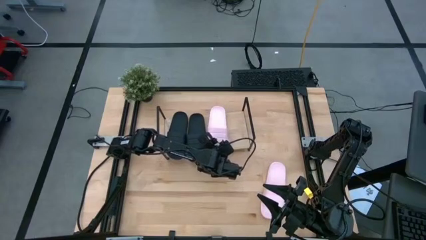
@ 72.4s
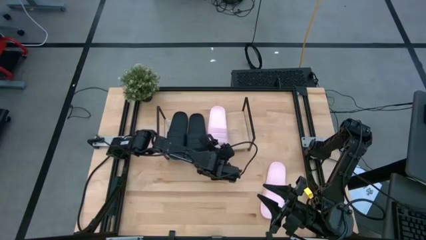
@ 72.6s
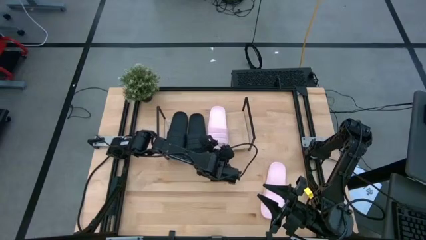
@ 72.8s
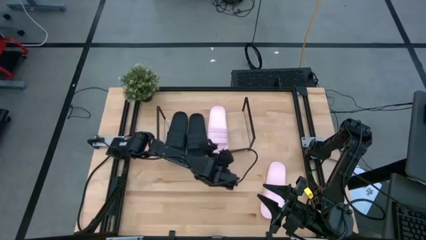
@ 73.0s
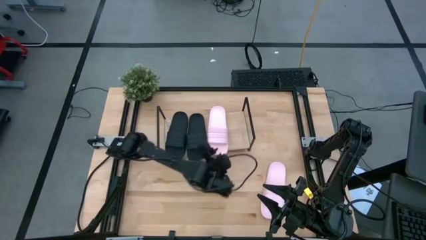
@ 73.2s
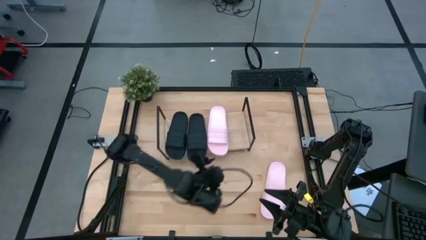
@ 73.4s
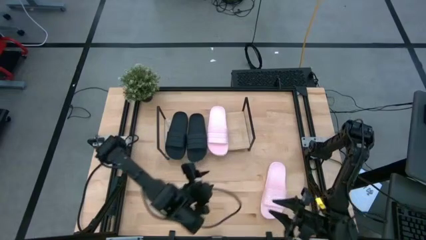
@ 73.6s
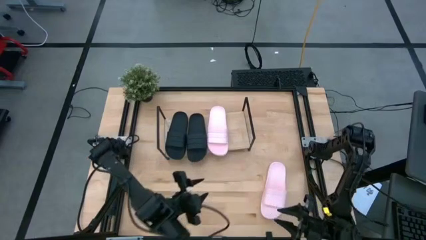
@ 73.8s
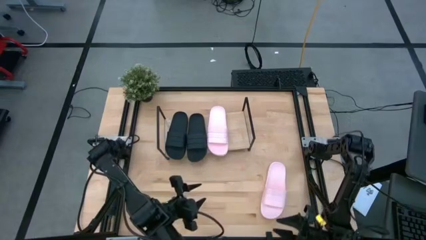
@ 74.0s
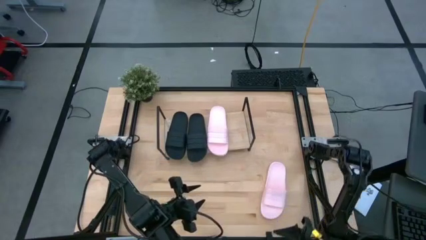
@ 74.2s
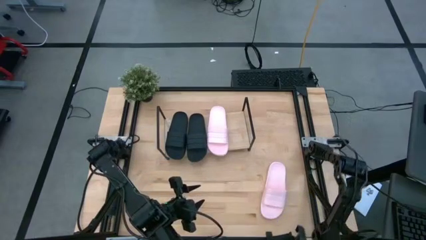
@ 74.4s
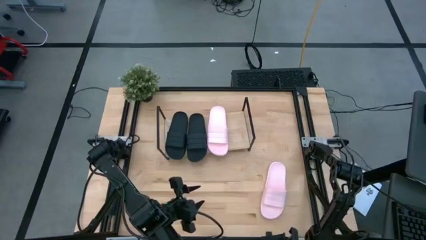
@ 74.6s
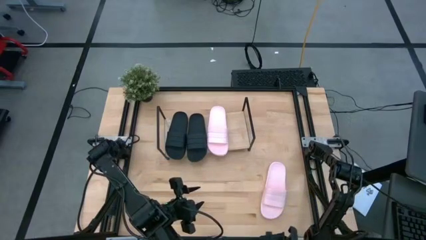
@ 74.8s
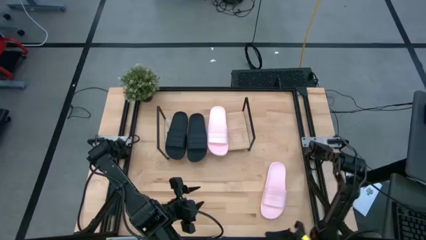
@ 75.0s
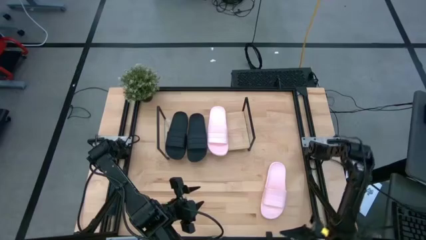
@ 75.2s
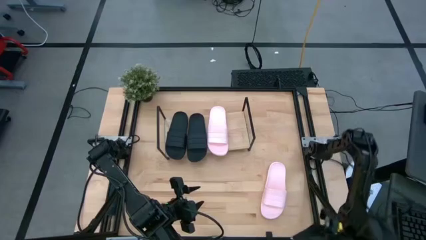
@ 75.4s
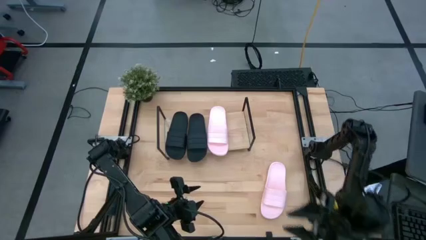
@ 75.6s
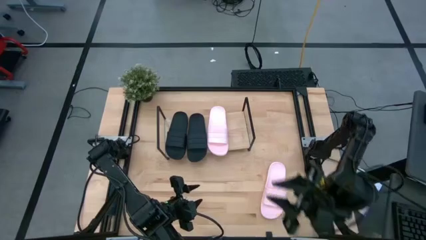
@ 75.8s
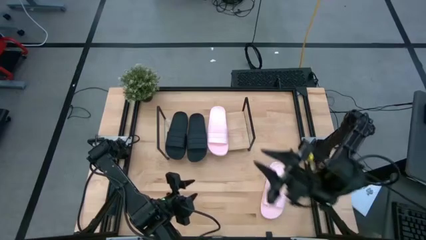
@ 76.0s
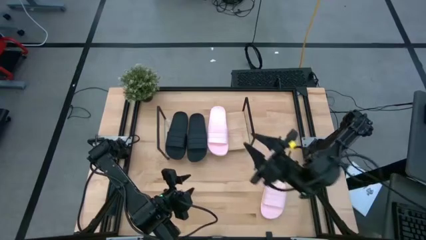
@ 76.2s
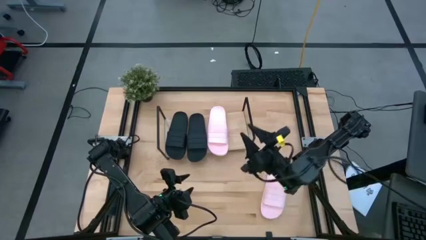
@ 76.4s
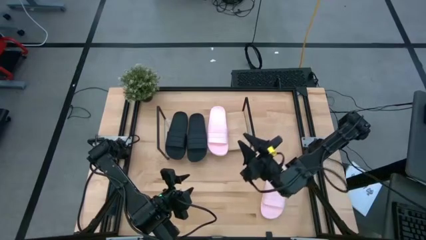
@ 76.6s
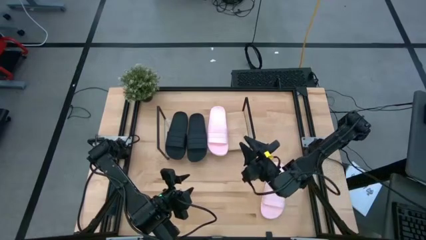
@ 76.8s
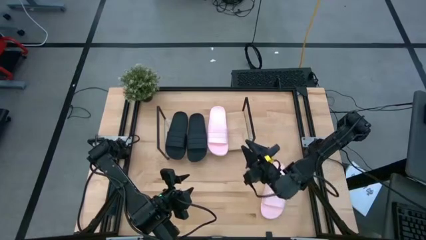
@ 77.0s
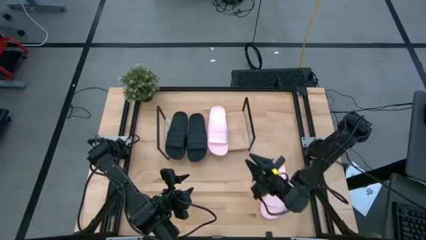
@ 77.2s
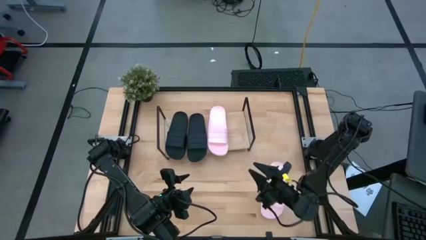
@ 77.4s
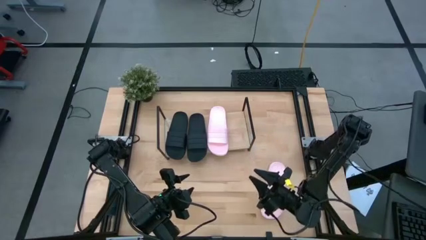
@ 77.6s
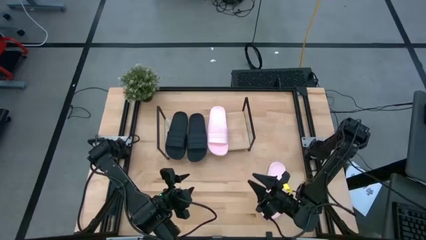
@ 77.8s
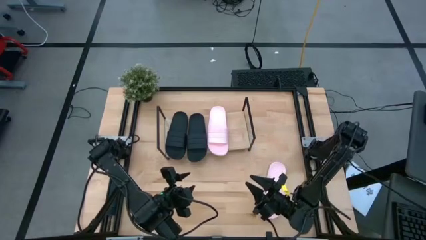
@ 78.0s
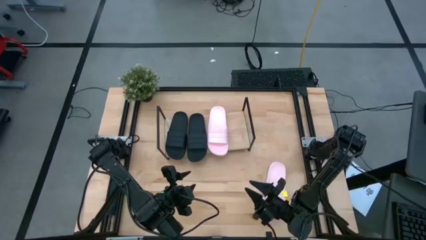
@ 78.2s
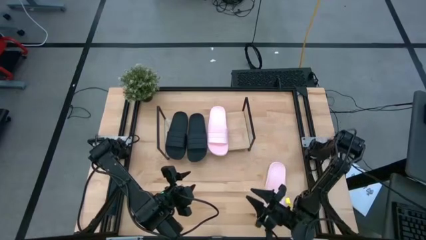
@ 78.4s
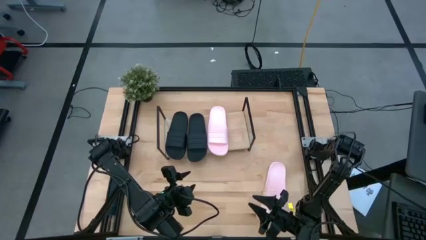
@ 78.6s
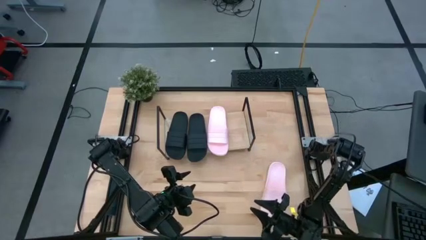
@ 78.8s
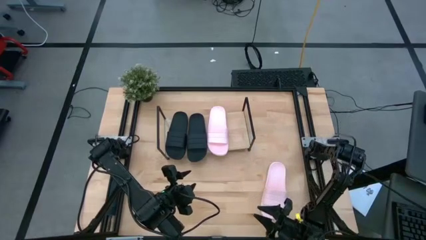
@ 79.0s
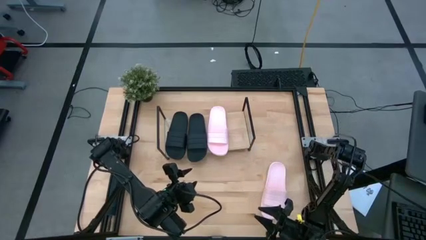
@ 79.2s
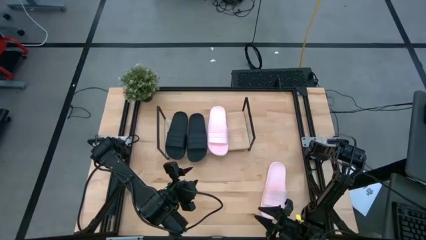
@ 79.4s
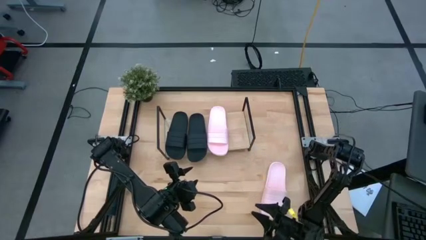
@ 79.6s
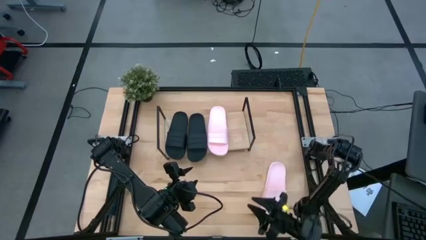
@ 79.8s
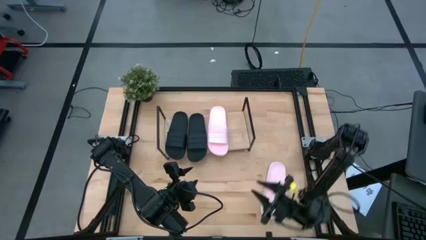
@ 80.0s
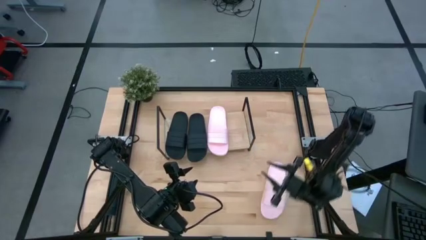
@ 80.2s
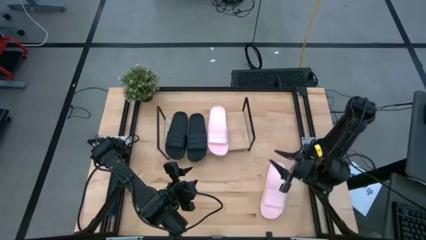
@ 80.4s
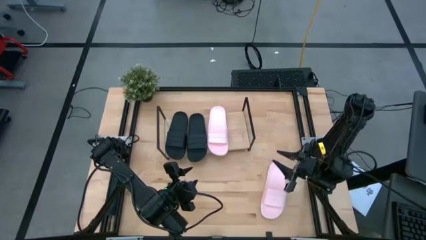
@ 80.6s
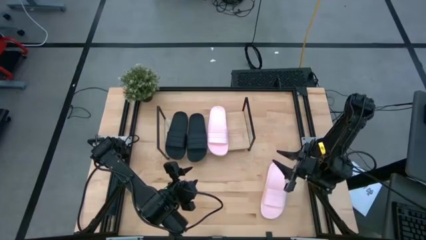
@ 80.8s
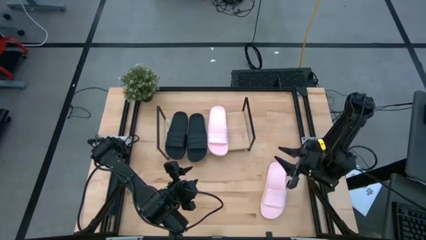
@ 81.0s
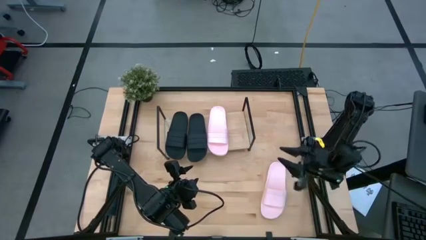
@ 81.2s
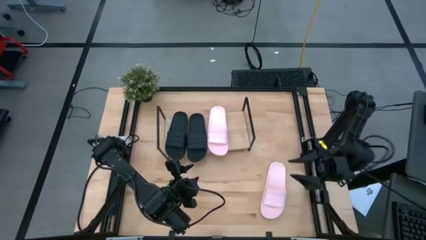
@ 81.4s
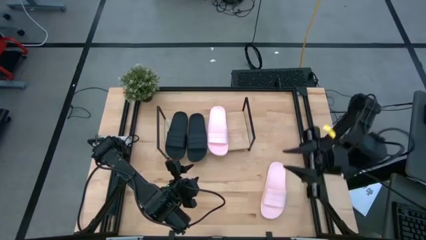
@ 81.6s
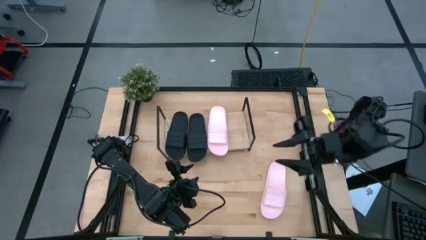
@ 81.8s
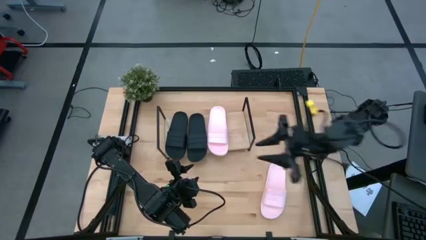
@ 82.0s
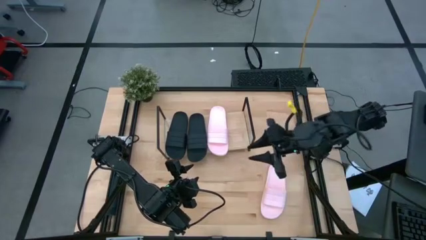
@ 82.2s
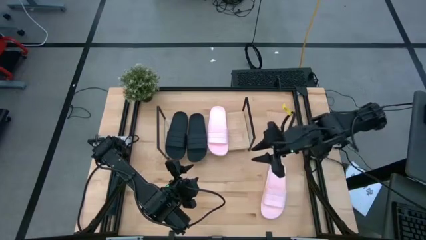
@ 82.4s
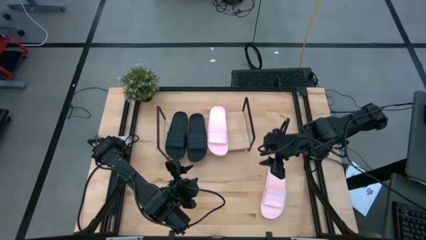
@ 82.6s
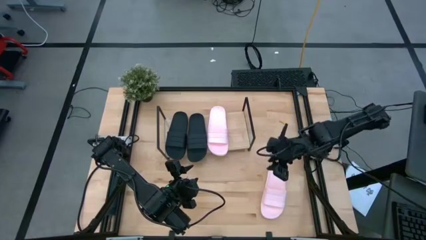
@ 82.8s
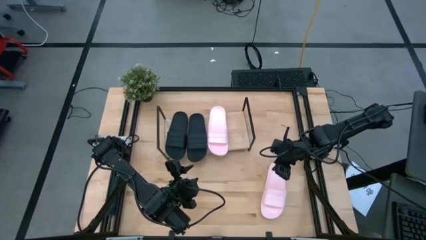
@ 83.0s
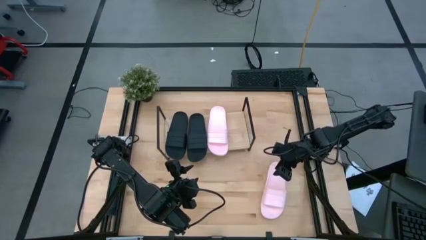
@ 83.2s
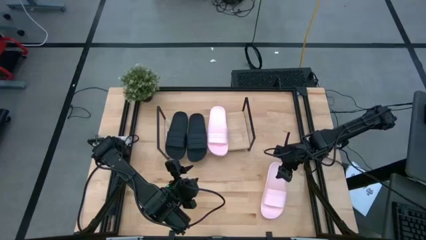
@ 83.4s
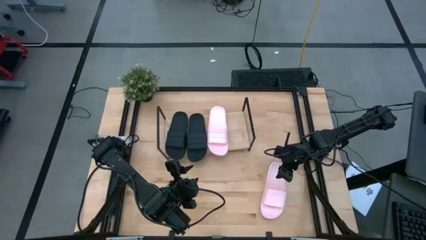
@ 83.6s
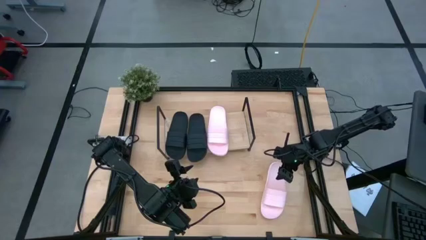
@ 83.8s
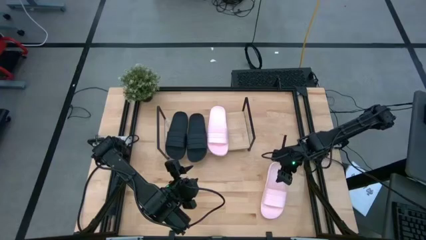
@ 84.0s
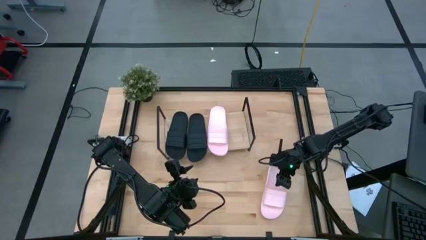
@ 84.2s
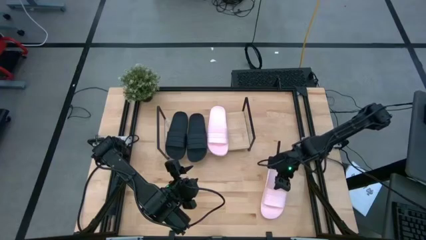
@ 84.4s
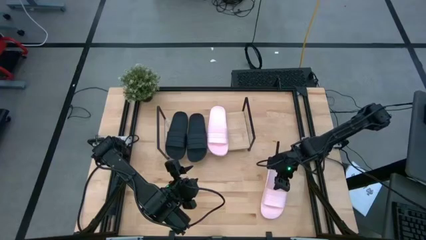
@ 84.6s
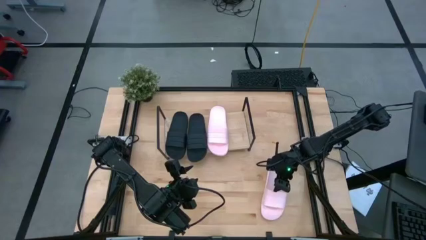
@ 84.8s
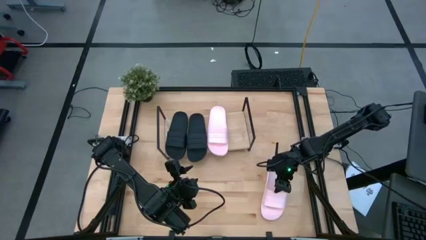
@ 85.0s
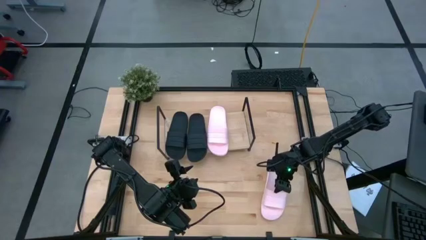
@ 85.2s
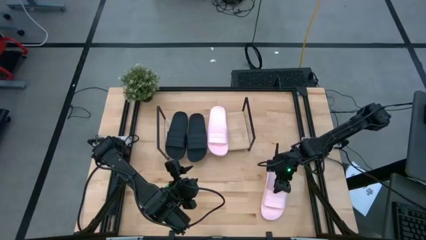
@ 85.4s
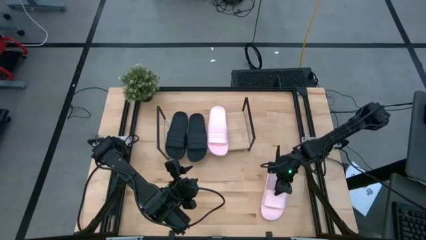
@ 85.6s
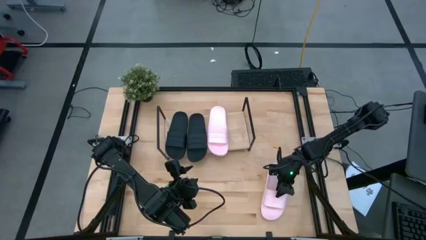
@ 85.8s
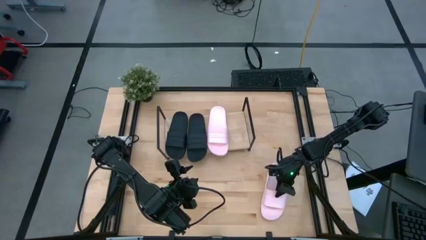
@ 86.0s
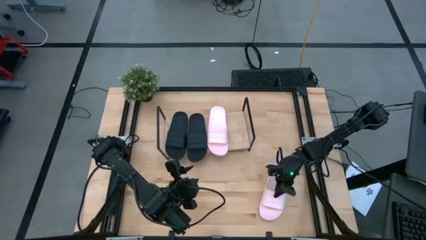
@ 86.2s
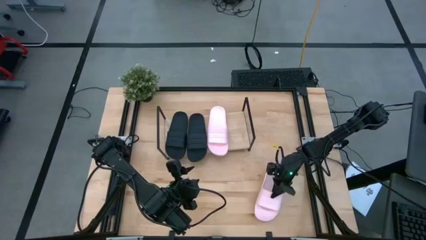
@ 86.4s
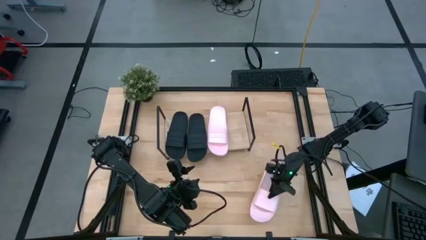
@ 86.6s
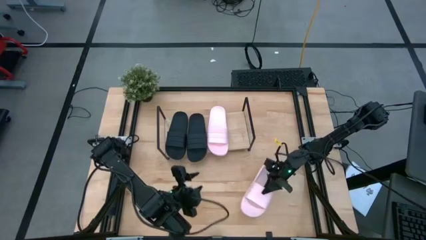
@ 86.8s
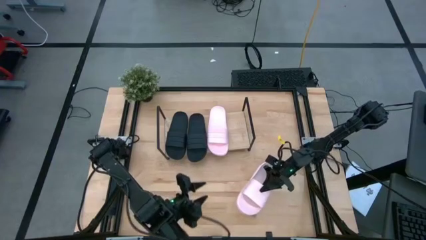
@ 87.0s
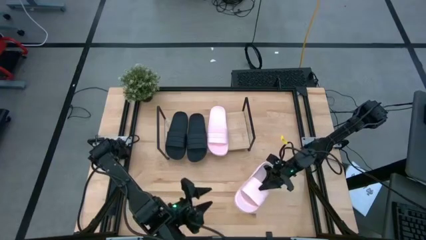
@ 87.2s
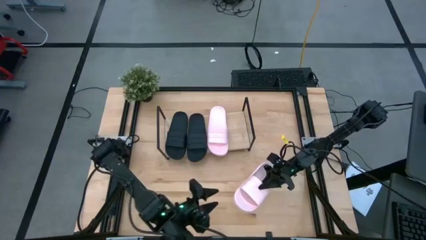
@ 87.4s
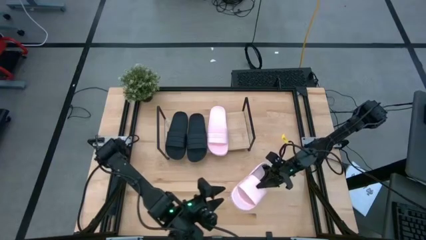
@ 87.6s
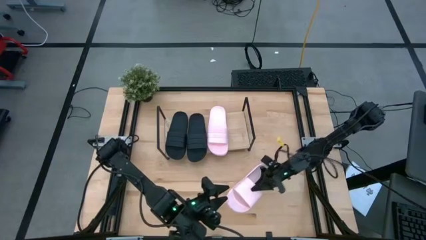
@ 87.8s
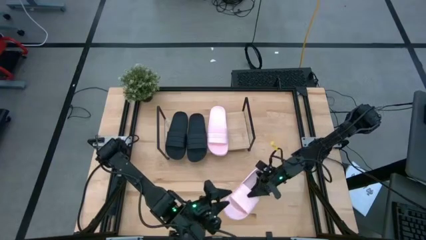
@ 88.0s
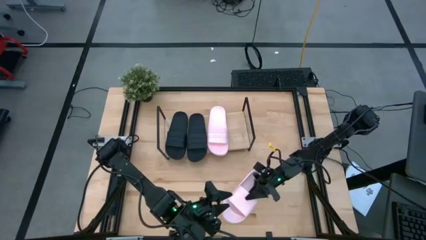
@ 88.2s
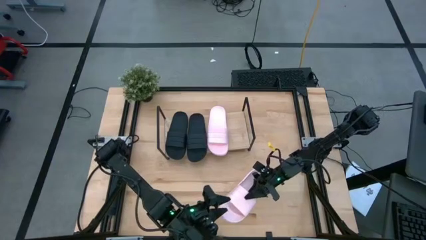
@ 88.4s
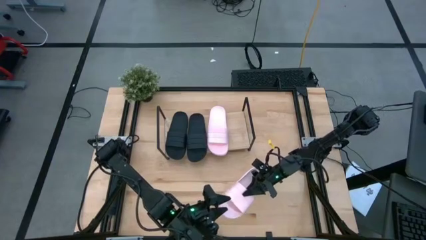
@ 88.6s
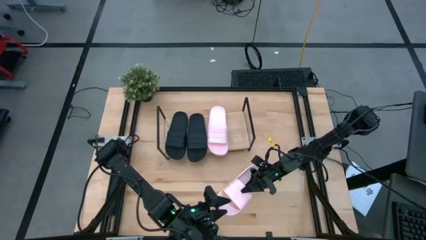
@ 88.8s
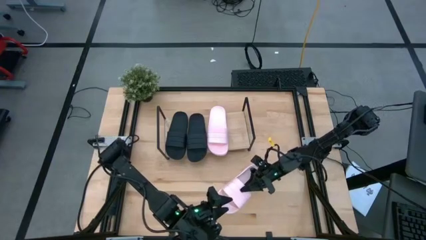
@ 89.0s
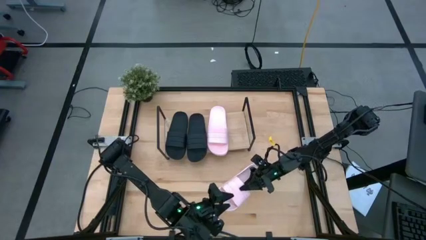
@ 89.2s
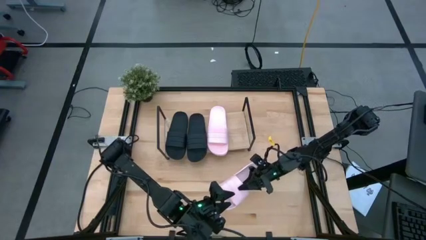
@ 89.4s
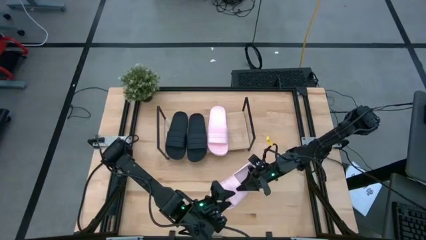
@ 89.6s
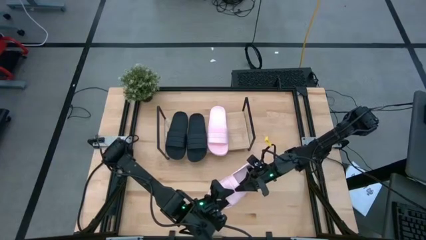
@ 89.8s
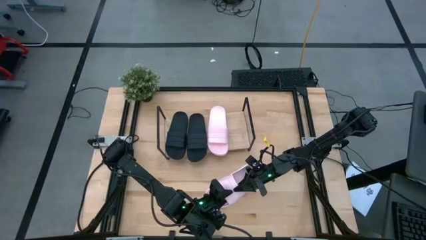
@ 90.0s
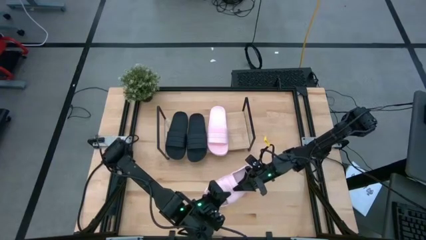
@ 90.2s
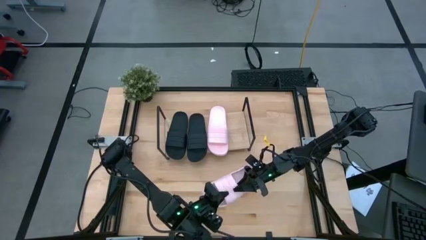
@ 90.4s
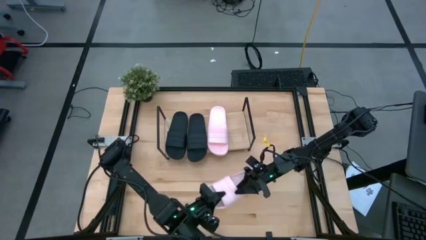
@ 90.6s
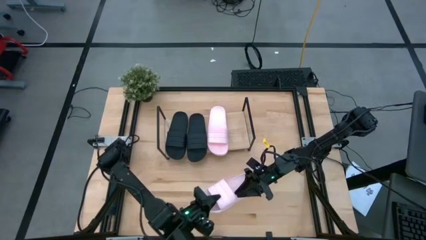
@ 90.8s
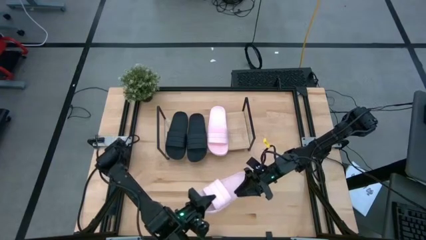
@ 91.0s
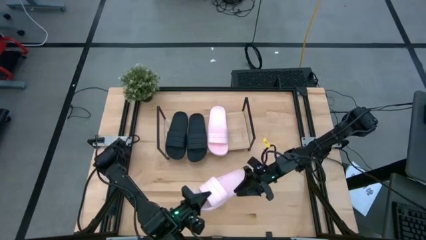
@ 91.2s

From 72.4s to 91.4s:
Task: Pick and place slides into the shelf
Put the pink pair of slide on the shelf
